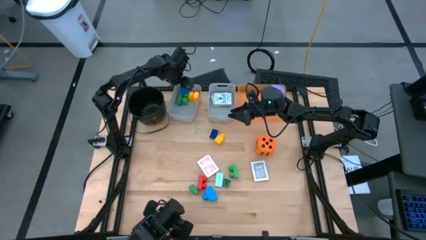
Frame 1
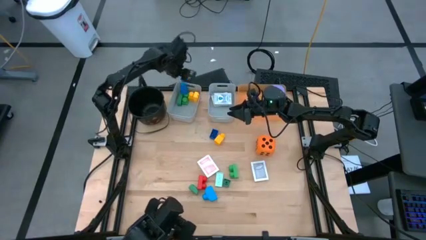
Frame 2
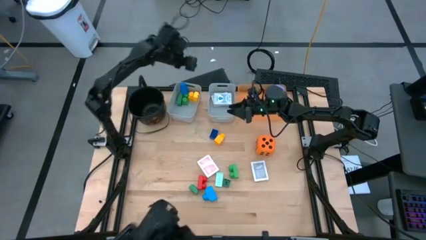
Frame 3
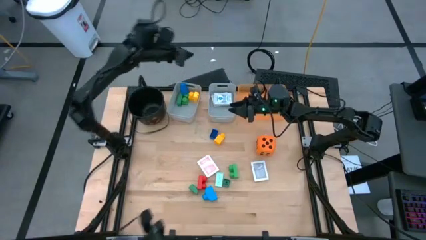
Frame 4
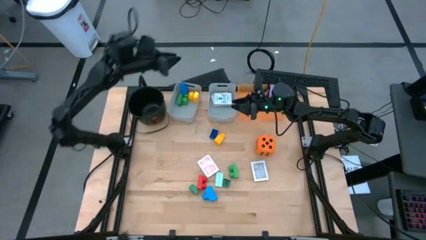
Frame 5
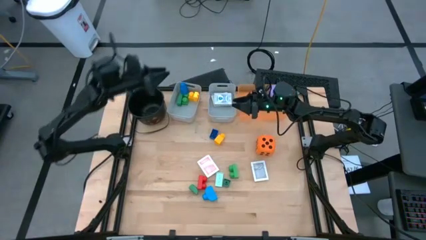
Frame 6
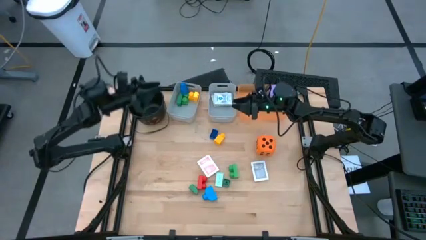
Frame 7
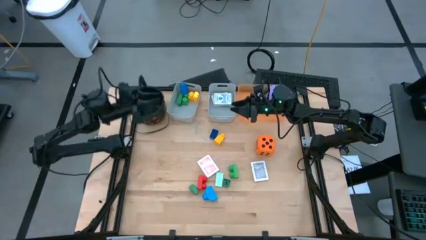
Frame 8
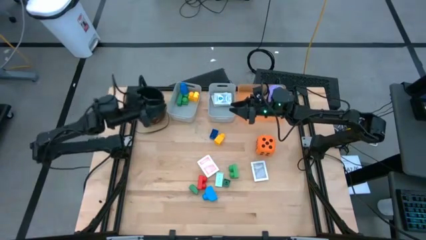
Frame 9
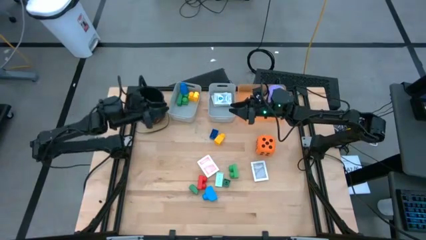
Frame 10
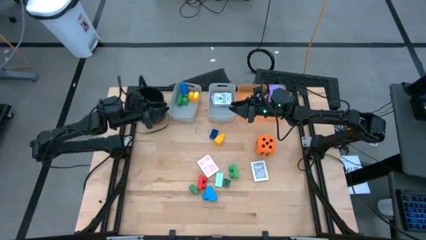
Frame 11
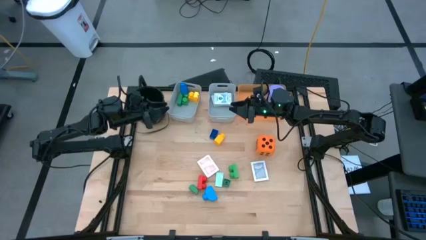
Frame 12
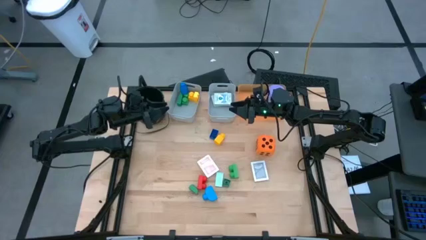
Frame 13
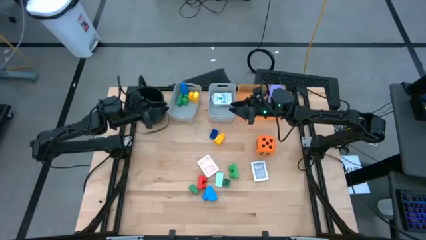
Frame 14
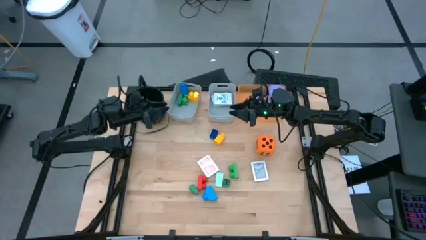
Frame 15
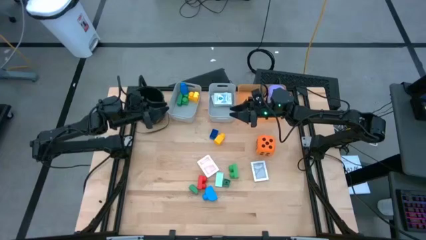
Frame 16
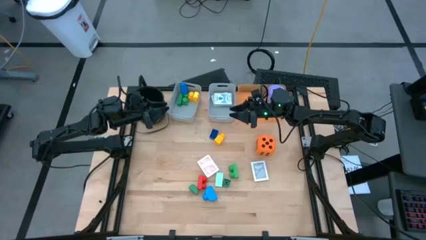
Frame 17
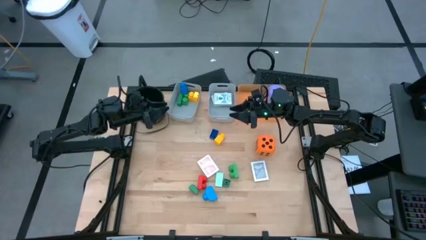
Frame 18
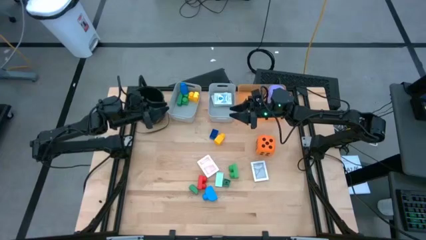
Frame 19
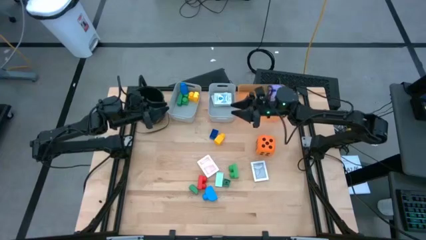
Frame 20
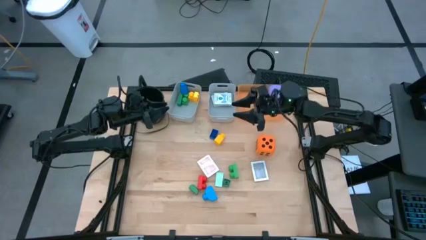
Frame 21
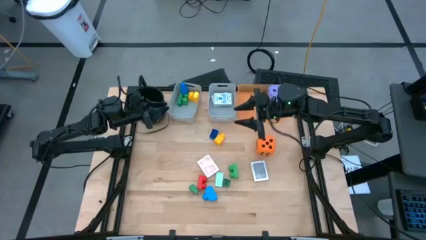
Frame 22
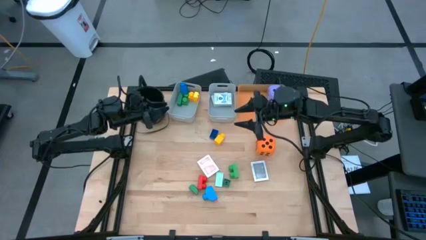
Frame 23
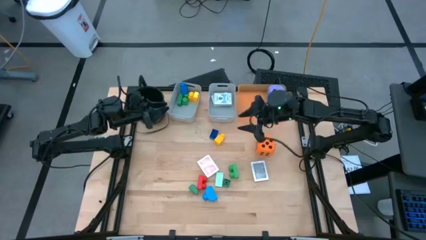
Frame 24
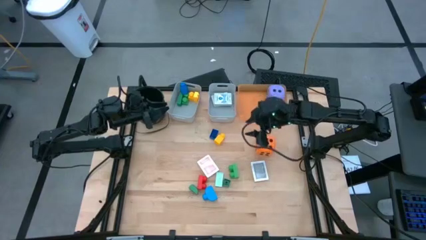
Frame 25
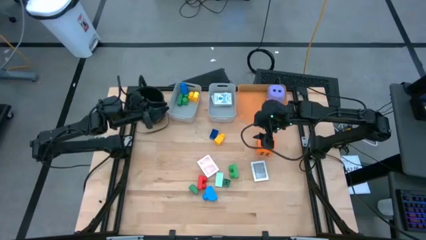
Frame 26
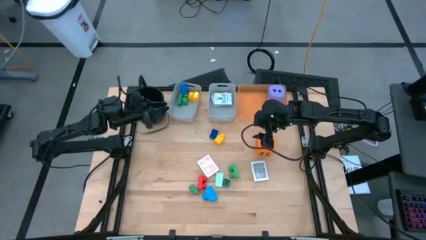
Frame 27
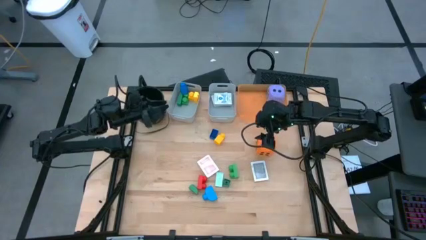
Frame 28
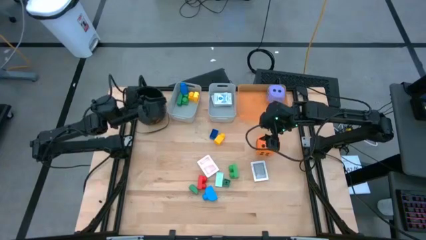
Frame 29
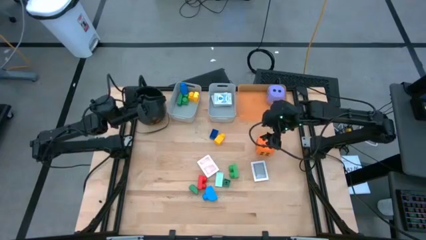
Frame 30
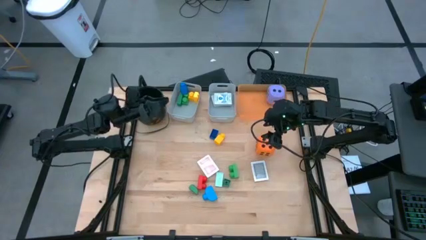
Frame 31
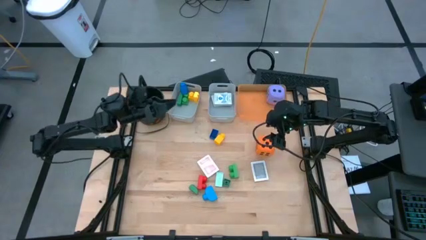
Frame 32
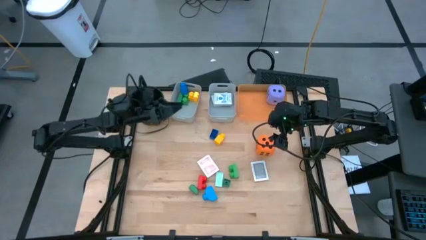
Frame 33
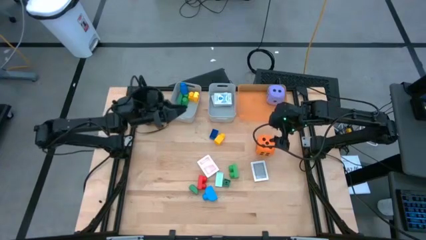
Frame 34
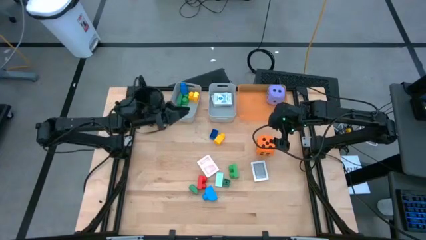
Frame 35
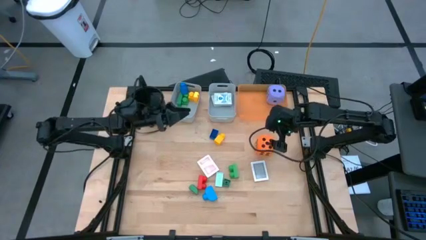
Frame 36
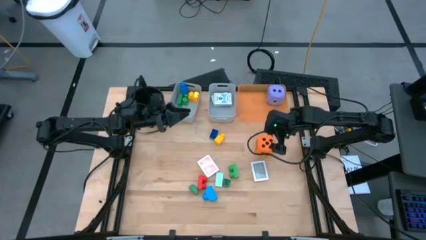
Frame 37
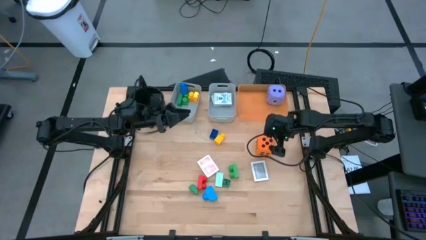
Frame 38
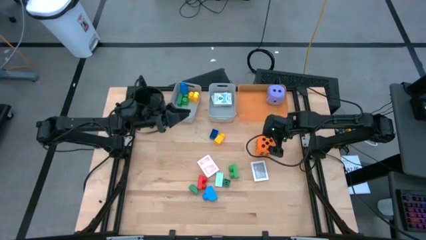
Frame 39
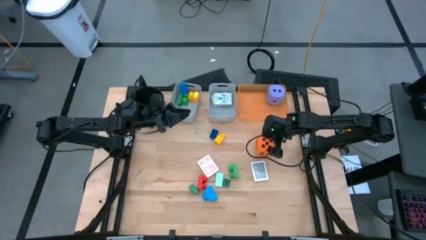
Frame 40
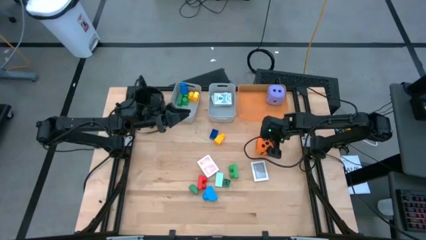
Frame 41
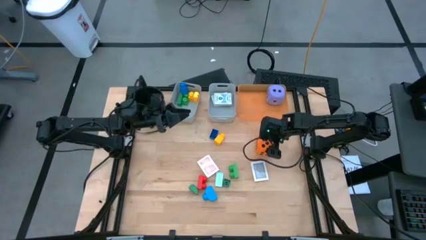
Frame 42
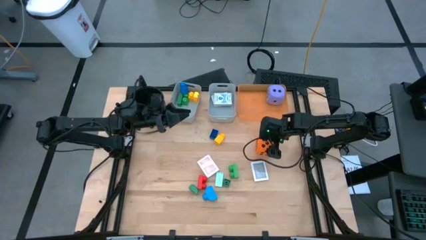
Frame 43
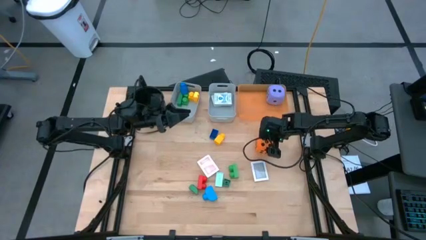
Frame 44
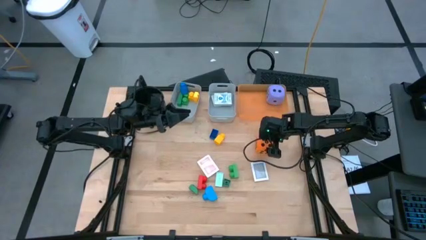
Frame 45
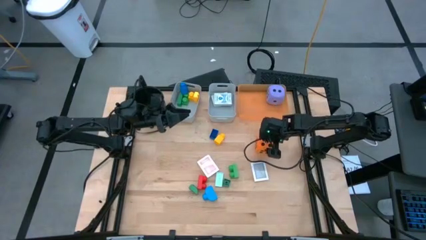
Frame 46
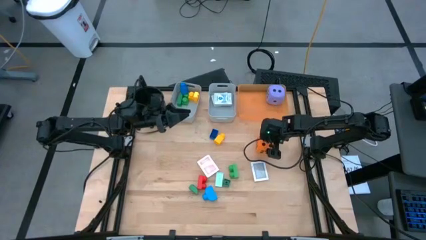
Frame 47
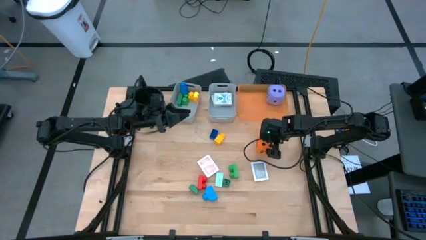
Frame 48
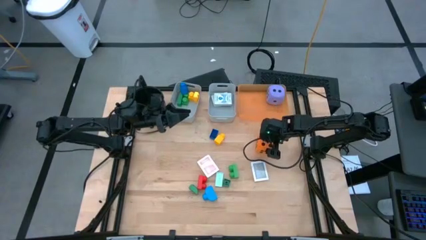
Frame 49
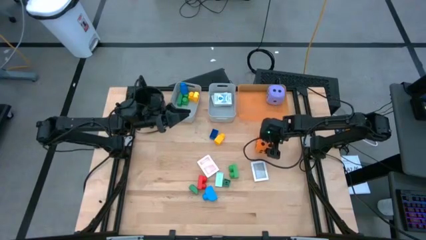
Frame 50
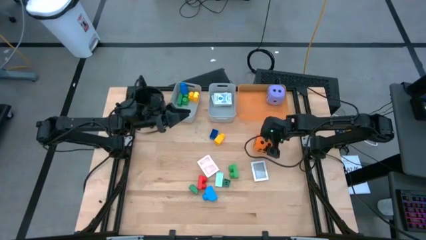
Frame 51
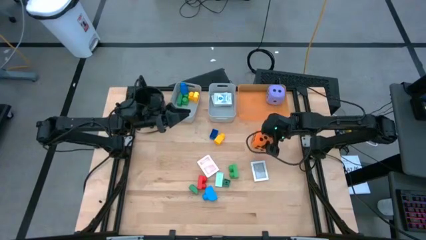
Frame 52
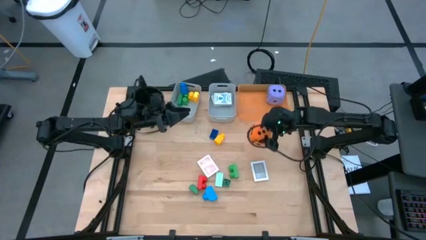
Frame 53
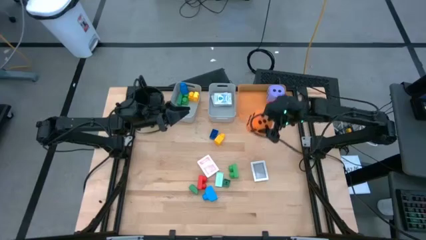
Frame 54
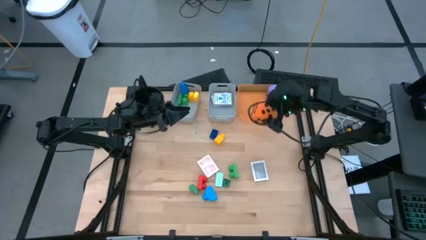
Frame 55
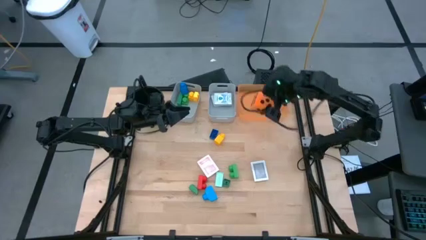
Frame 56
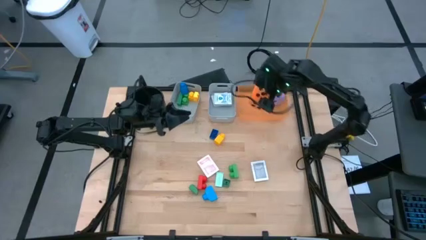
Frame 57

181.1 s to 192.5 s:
Task: Pick & Place Toys
Put the orange dice into the orange bin
